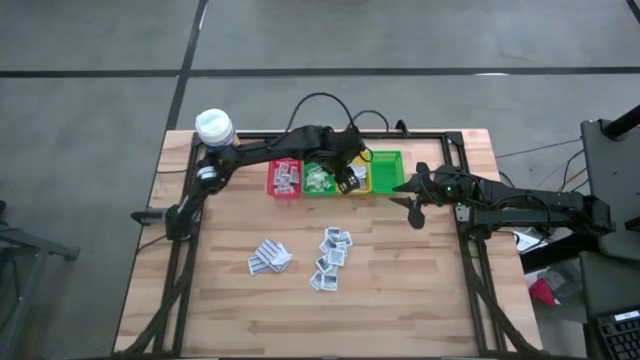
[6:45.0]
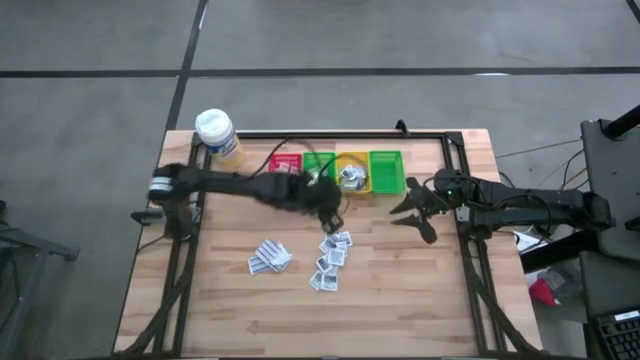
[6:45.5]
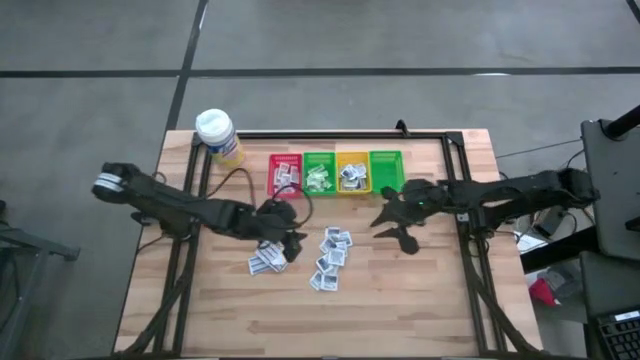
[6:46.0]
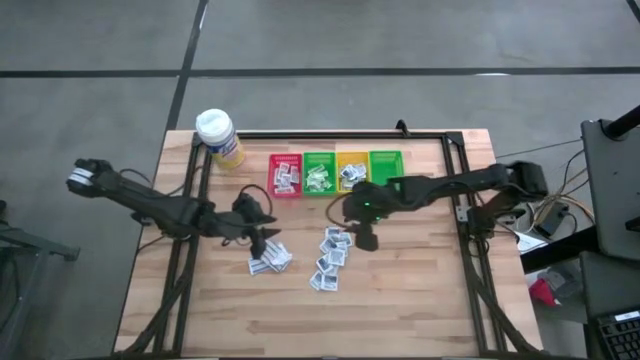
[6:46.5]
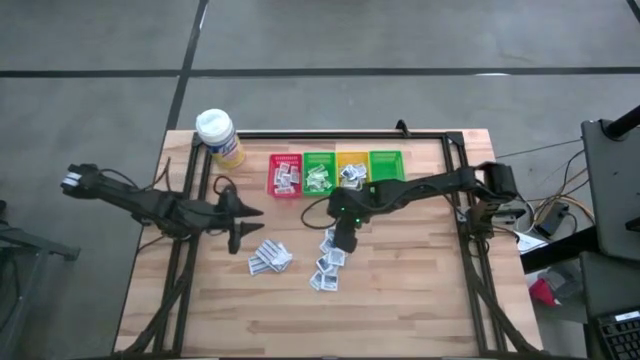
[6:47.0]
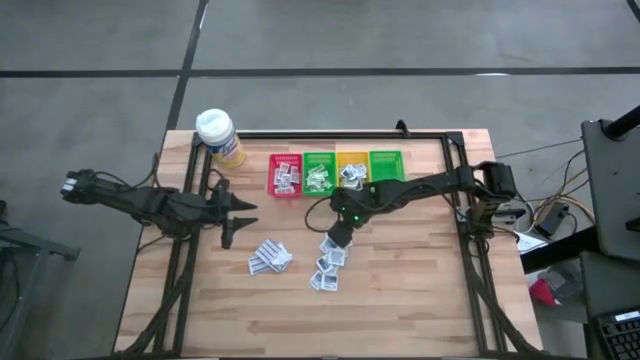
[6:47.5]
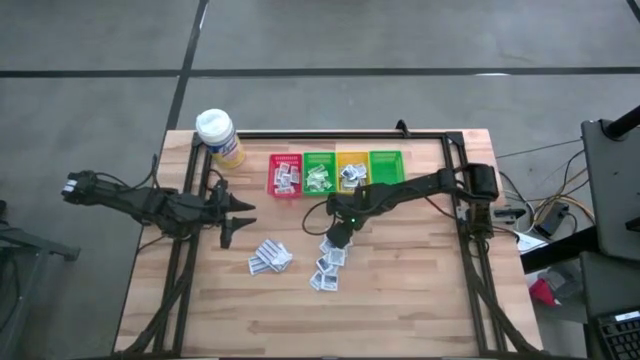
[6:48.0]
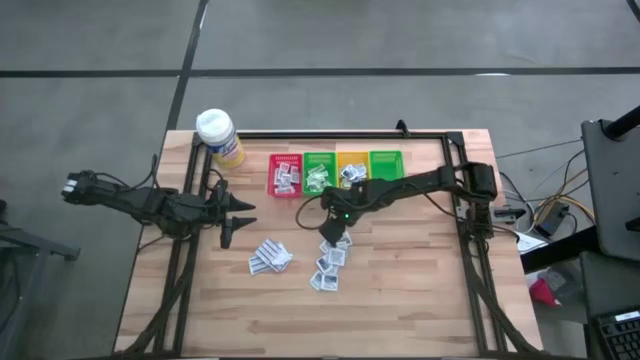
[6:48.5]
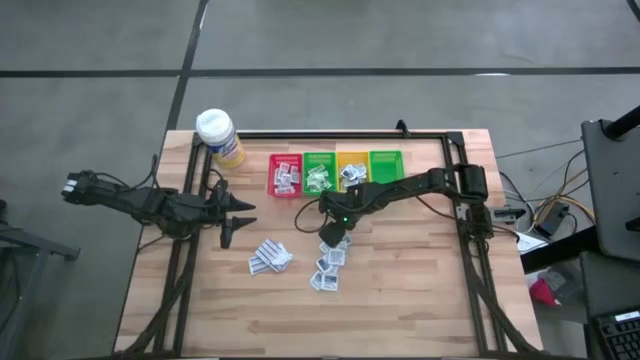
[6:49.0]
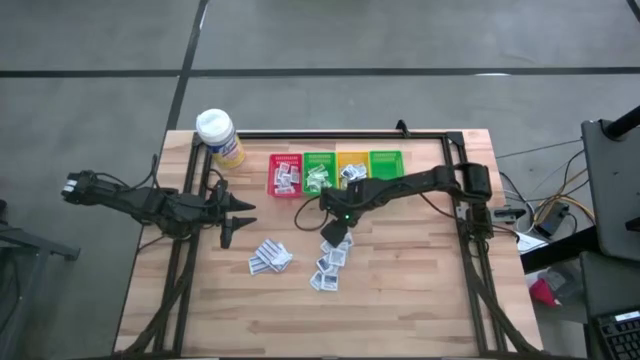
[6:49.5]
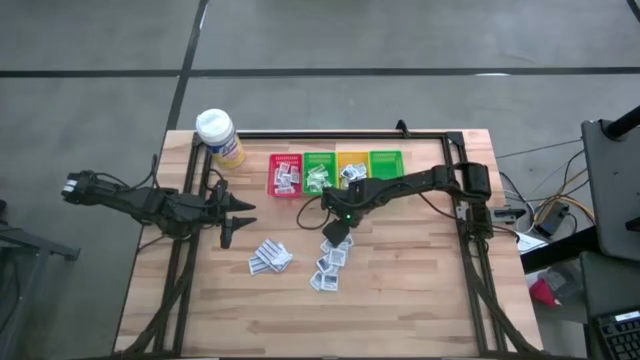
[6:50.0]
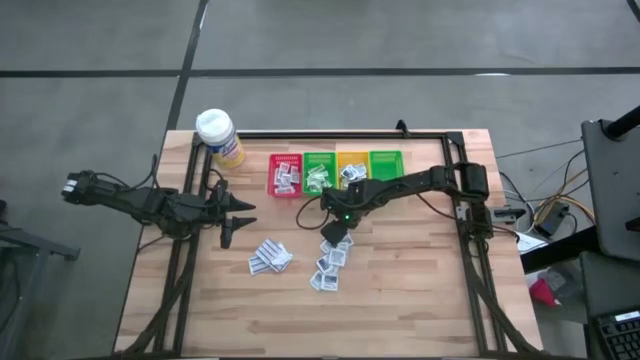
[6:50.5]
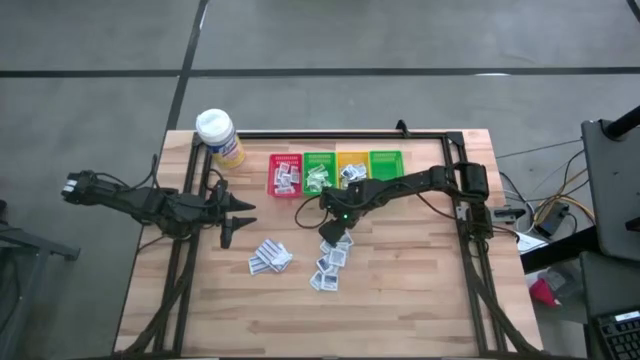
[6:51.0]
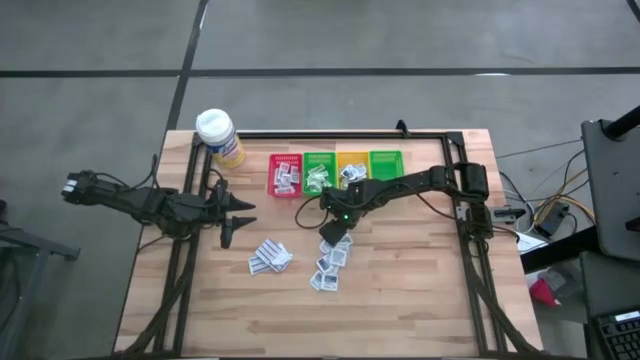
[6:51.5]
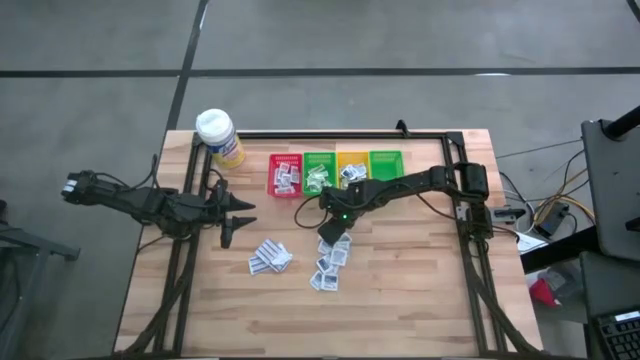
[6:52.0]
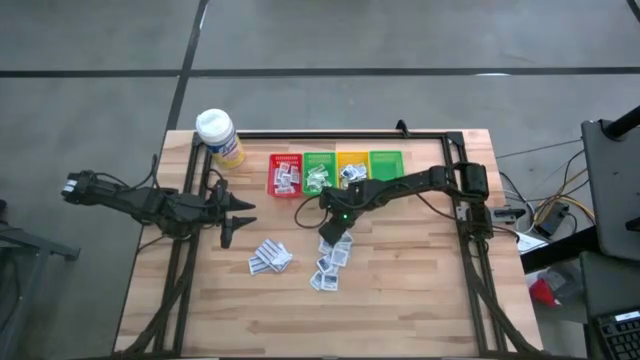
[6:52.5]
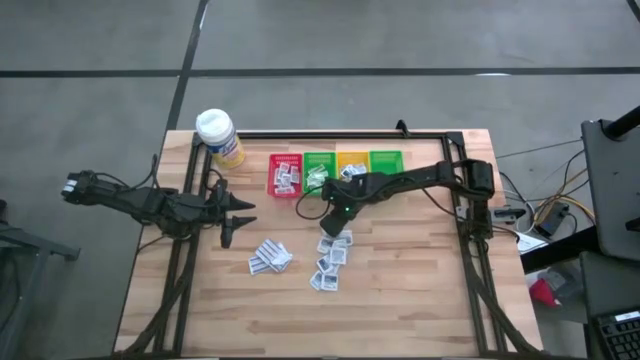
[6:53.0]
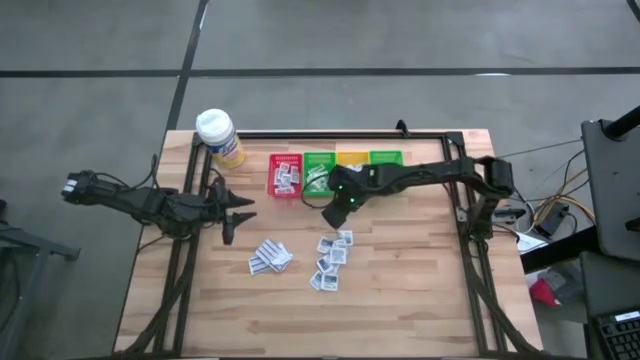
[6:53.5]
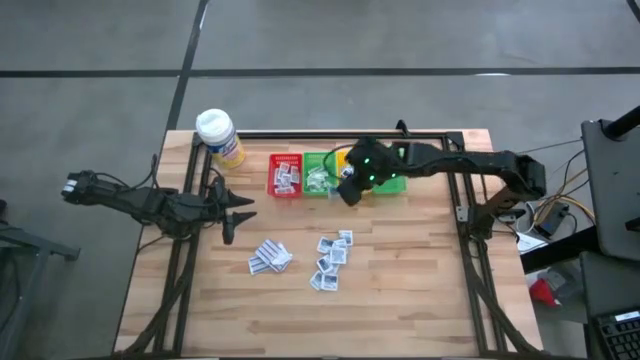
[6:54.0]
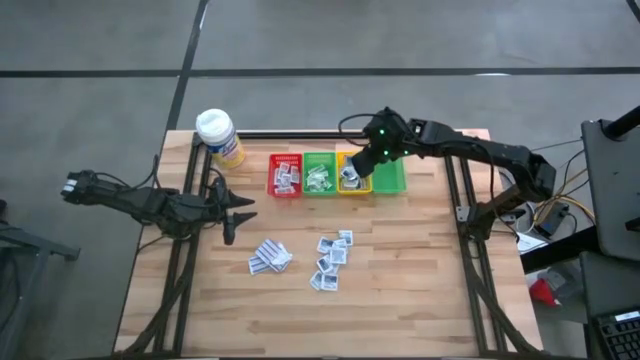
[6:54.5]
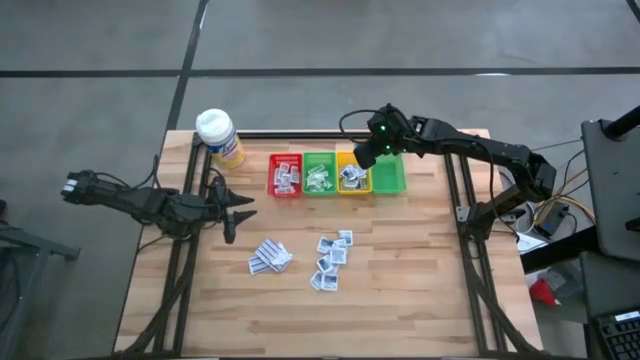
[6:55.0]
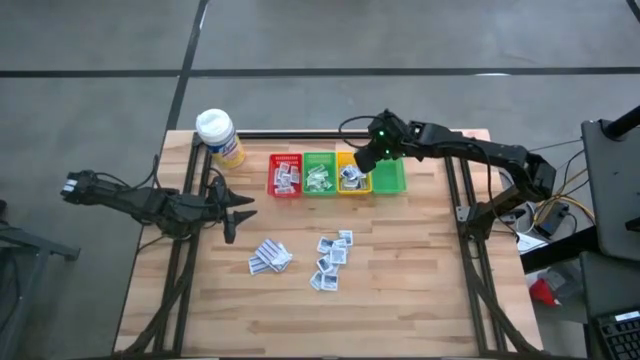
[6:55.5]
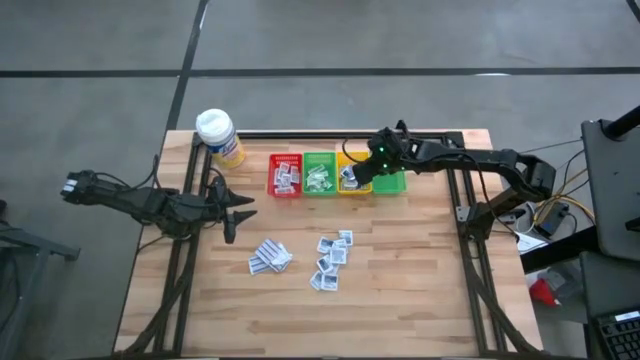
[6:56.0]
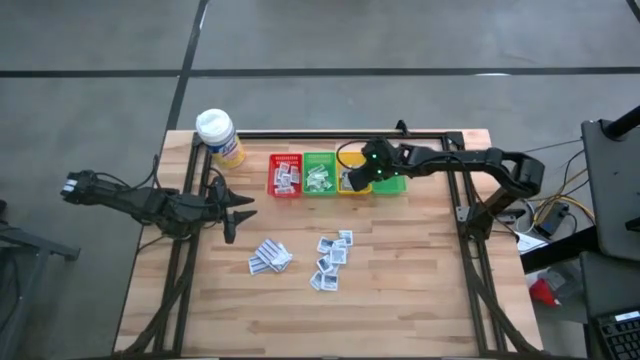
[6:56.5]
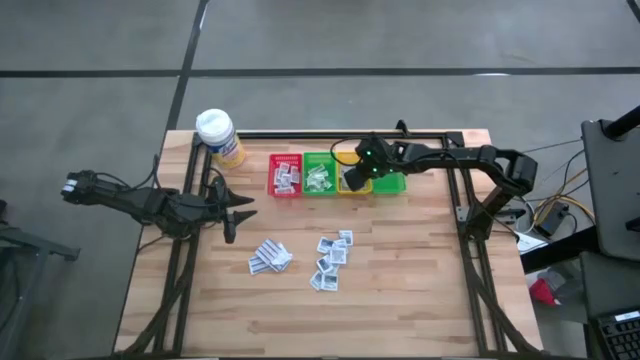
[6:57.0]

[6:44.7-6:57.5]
Task: Pick & Place First Aid Supplies
Put the alcohol pad into the yellow bin

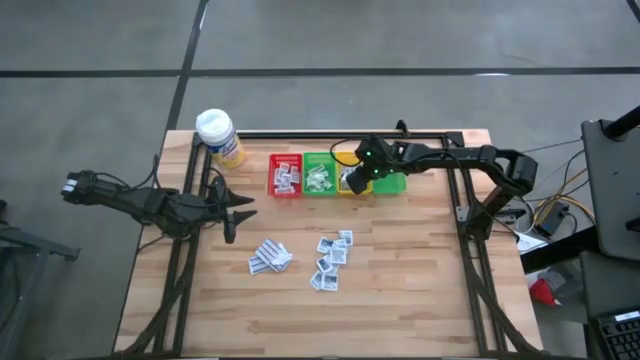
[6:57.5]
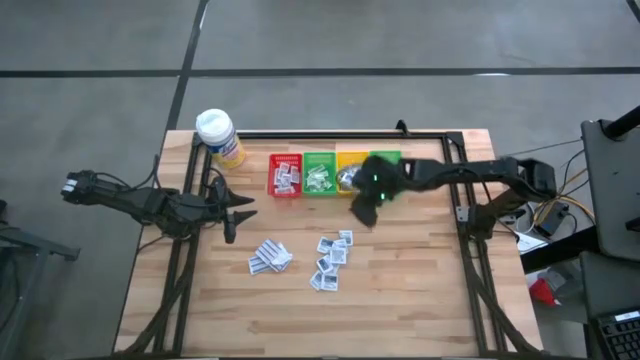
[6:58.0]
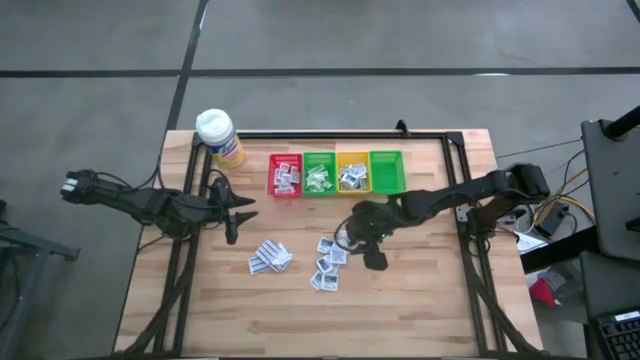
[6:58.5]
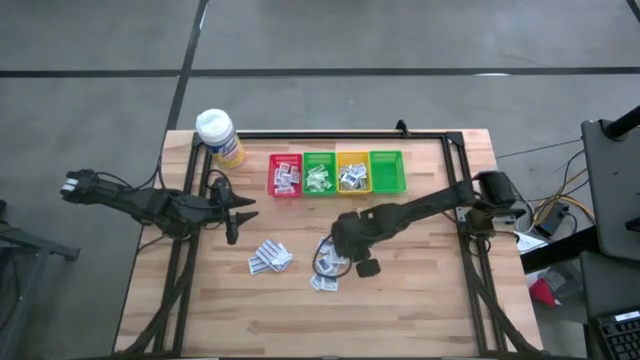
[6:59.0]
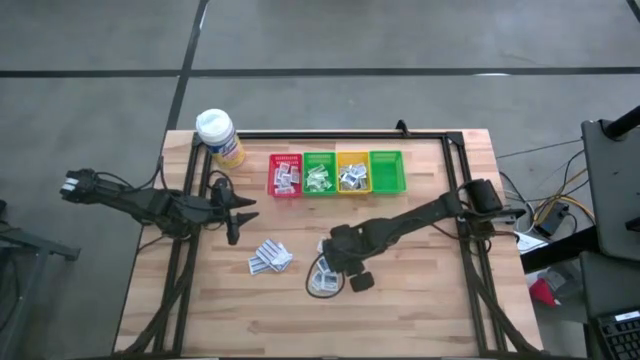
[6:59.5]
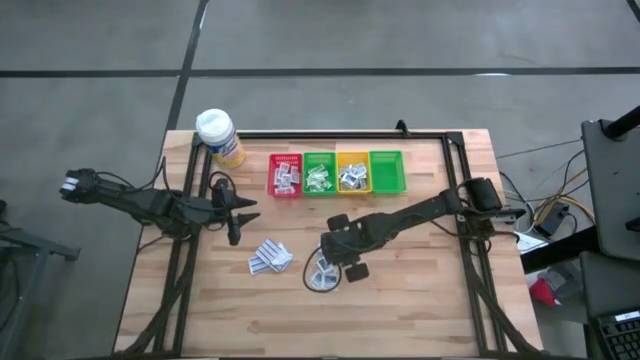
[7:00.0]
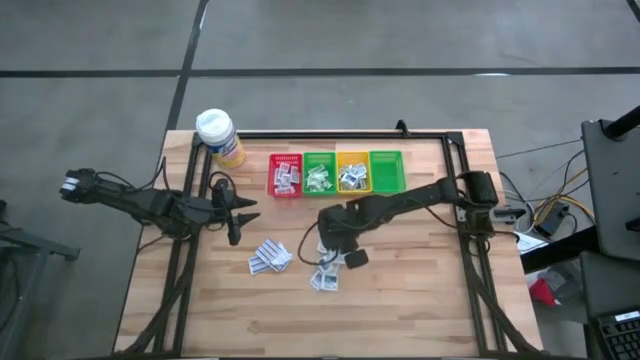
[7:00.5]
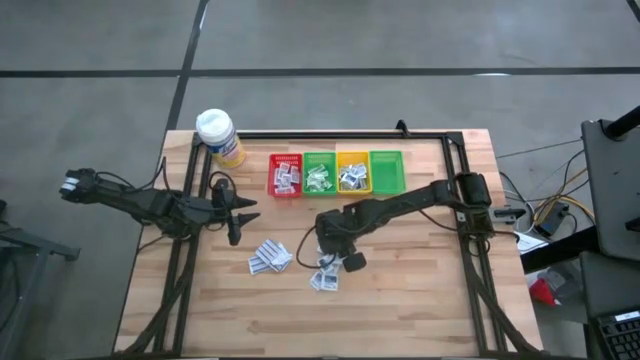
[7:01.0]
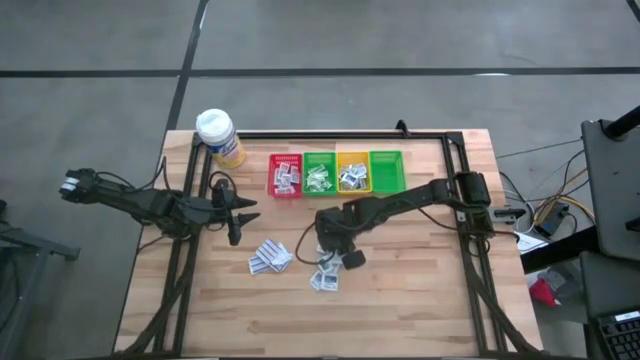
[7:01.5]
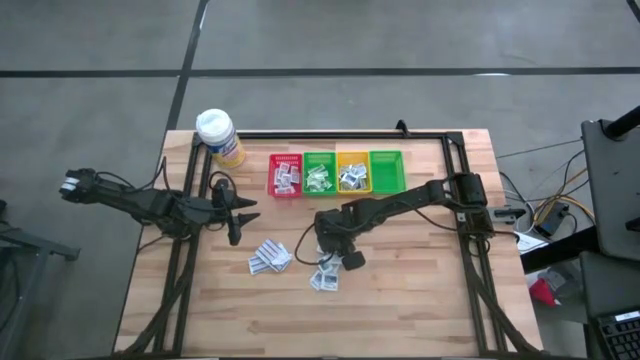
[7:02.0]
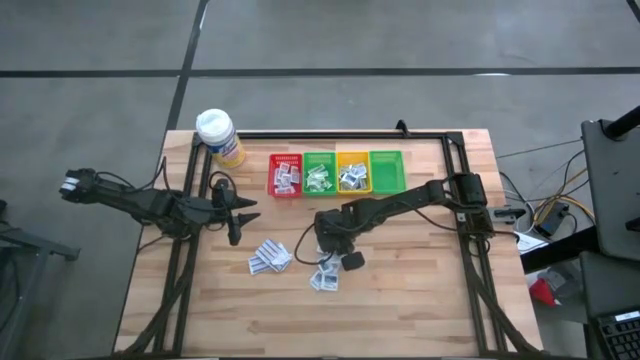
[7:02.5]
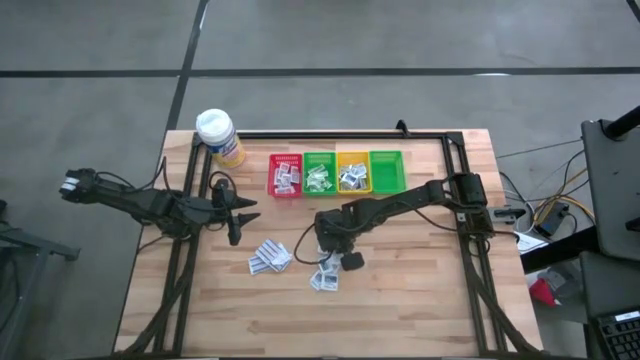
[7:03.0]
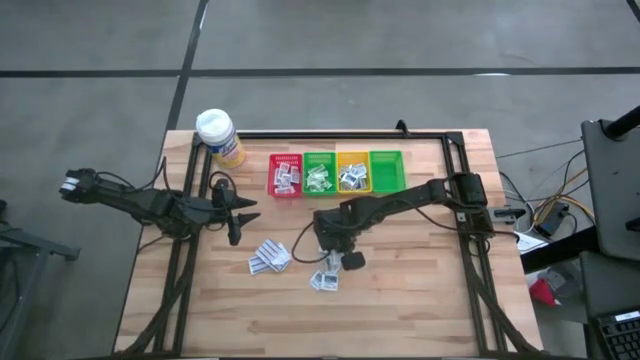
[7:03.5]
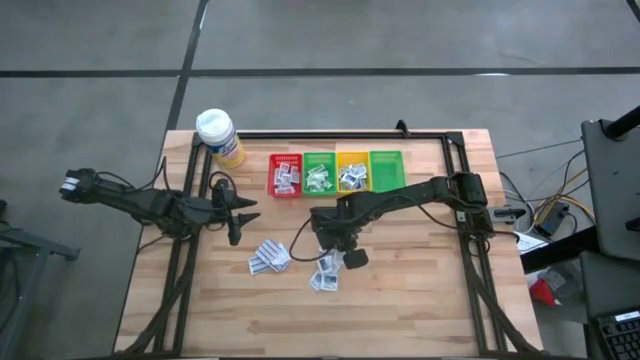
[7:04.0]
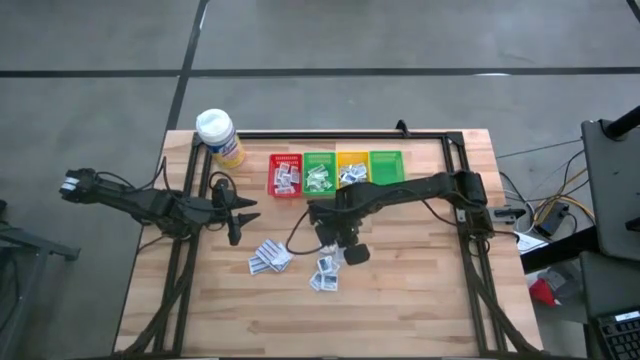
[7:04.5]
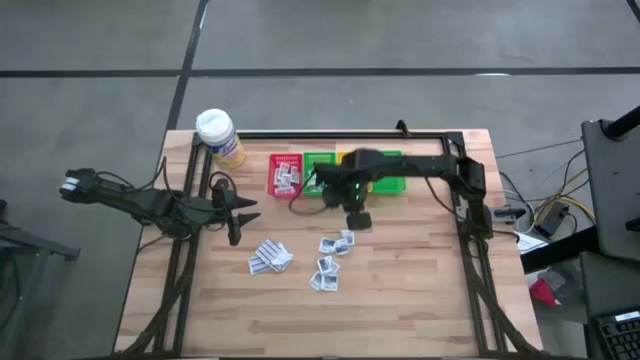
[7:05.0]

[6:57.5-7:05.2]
Put the alcohol pad into the yellow bin
